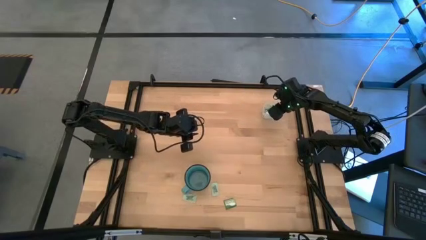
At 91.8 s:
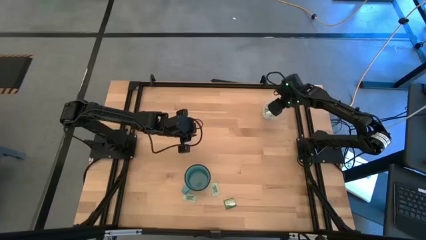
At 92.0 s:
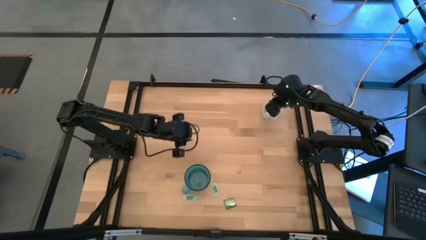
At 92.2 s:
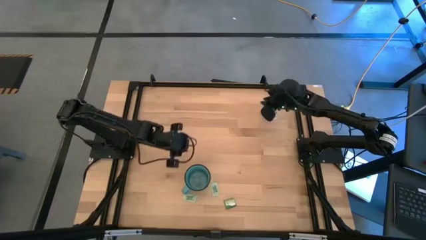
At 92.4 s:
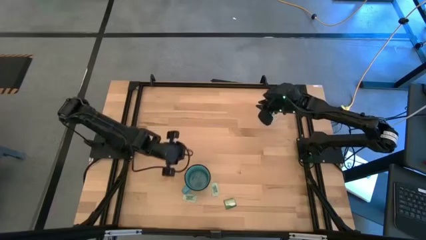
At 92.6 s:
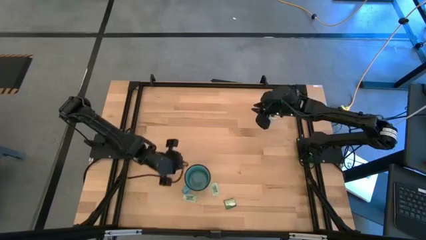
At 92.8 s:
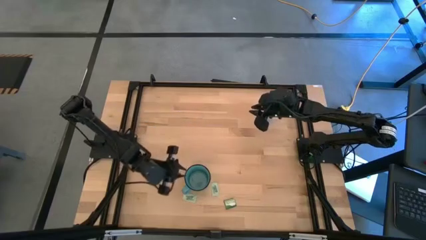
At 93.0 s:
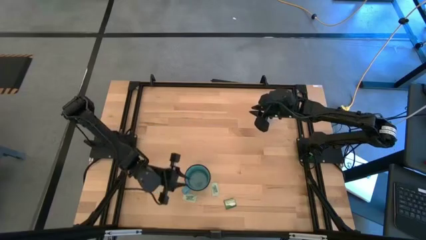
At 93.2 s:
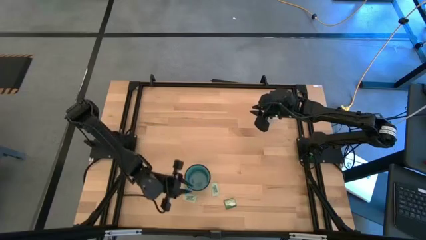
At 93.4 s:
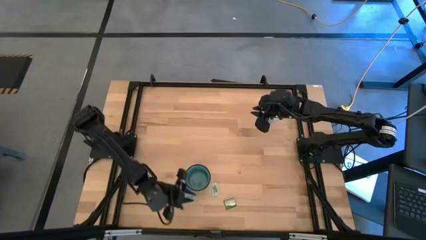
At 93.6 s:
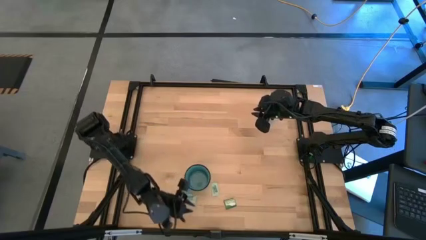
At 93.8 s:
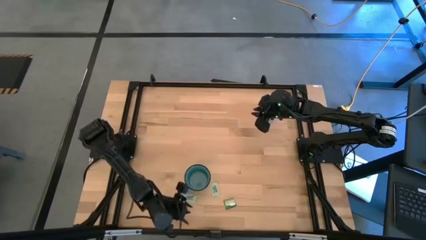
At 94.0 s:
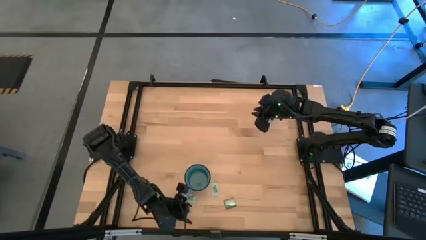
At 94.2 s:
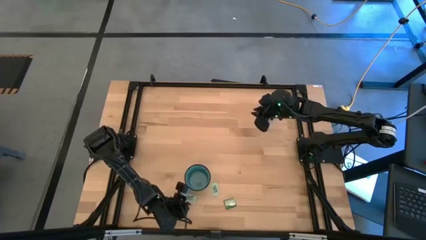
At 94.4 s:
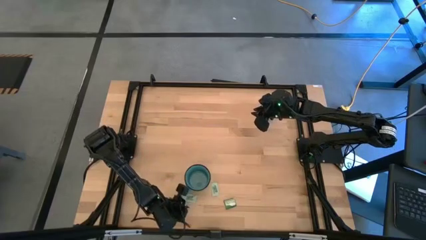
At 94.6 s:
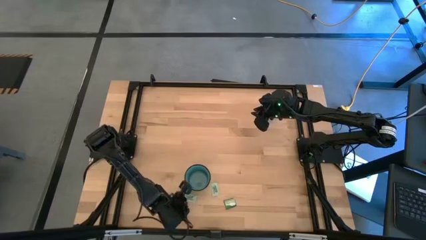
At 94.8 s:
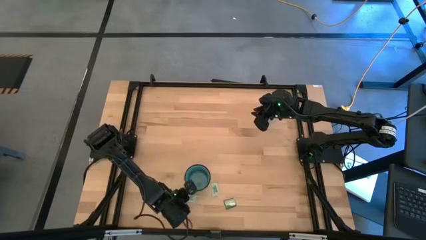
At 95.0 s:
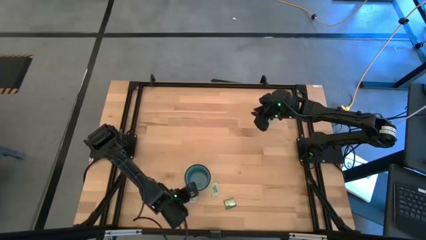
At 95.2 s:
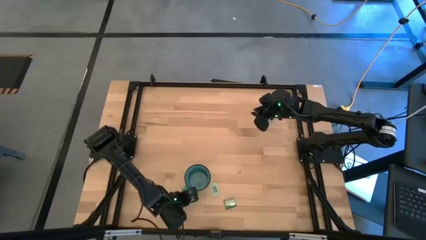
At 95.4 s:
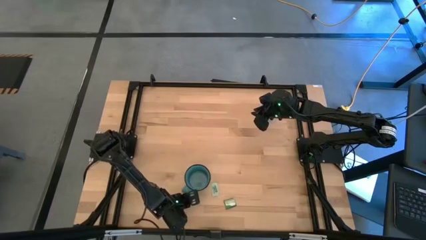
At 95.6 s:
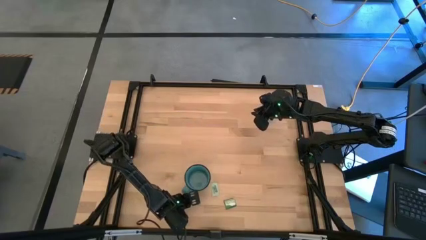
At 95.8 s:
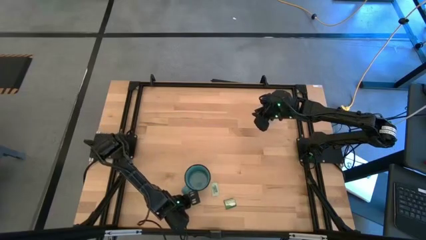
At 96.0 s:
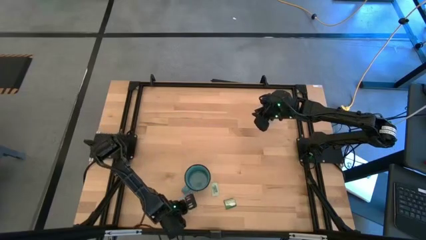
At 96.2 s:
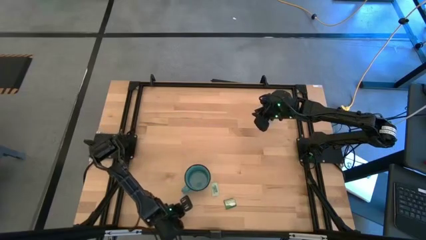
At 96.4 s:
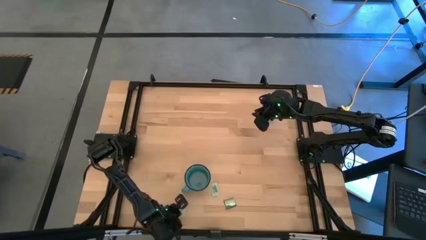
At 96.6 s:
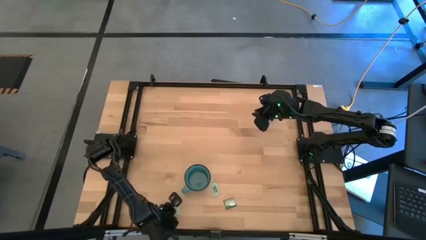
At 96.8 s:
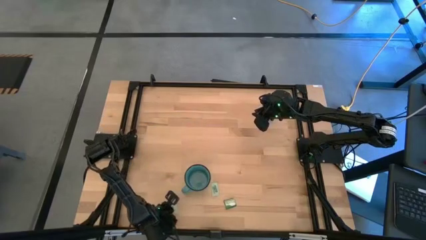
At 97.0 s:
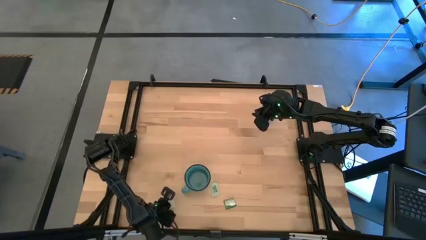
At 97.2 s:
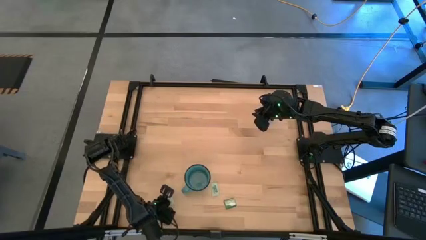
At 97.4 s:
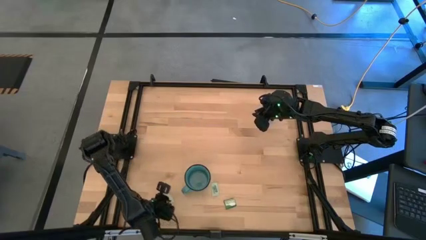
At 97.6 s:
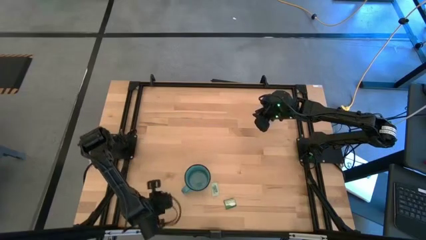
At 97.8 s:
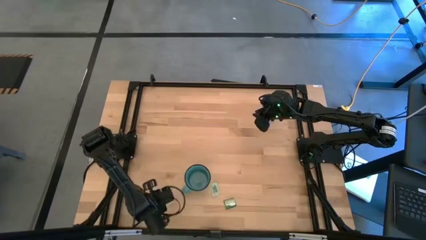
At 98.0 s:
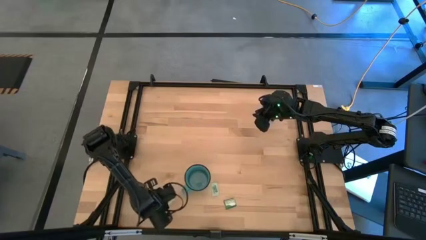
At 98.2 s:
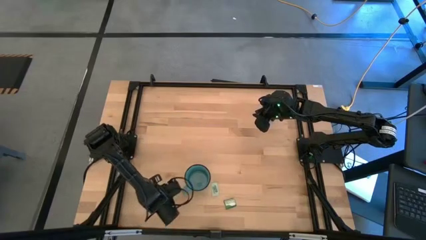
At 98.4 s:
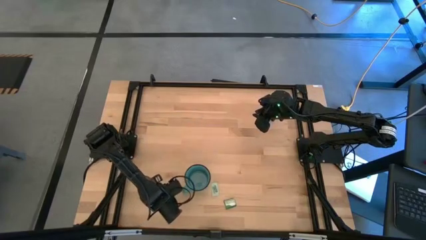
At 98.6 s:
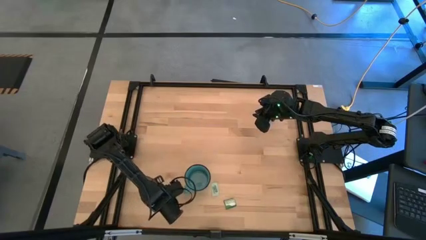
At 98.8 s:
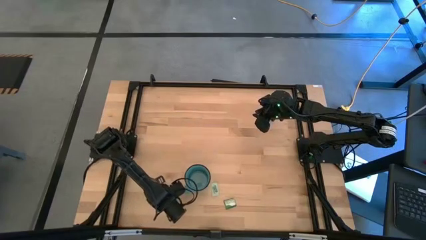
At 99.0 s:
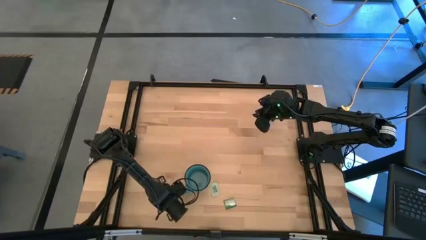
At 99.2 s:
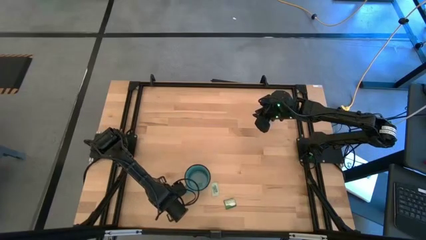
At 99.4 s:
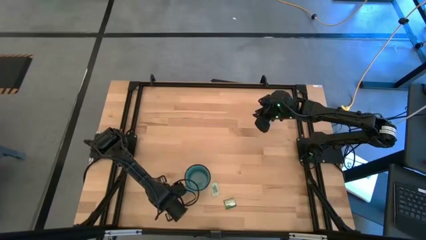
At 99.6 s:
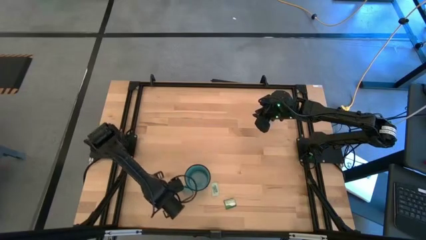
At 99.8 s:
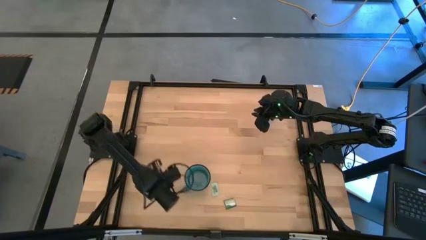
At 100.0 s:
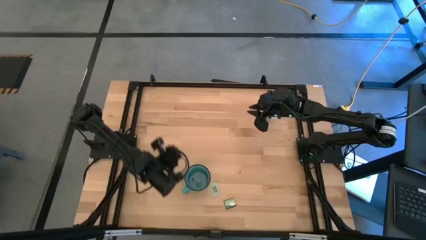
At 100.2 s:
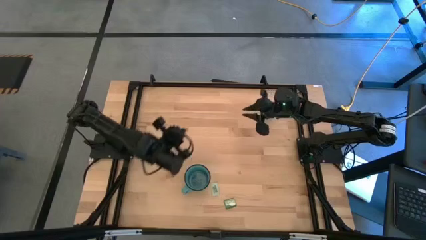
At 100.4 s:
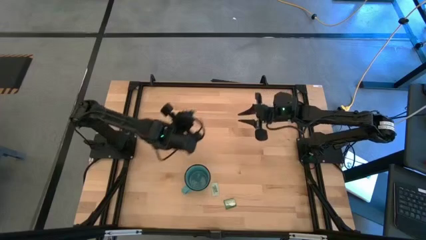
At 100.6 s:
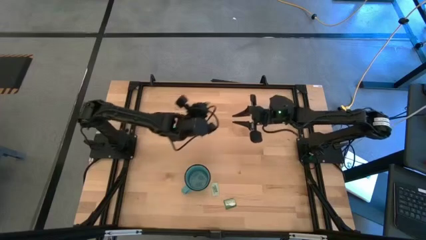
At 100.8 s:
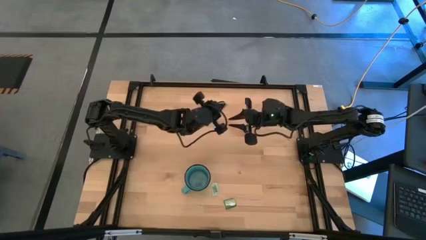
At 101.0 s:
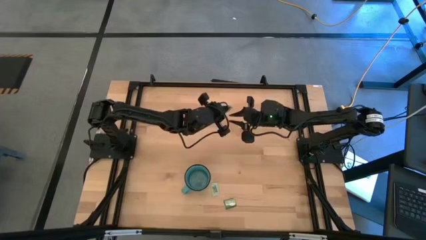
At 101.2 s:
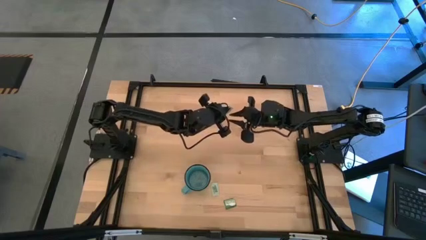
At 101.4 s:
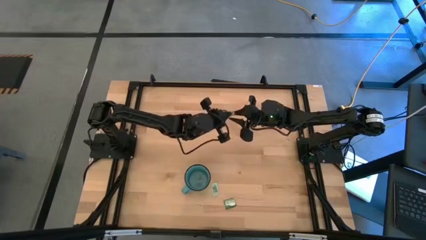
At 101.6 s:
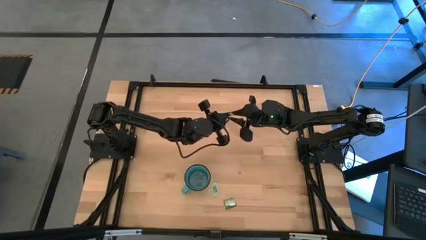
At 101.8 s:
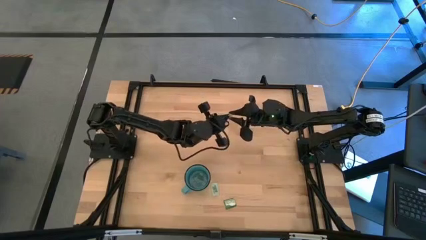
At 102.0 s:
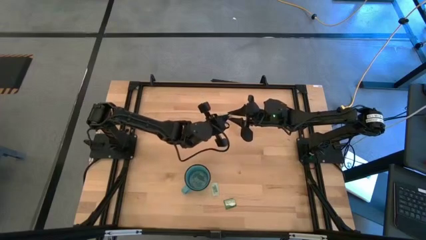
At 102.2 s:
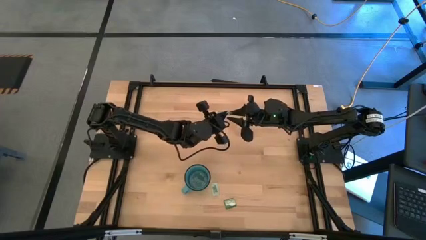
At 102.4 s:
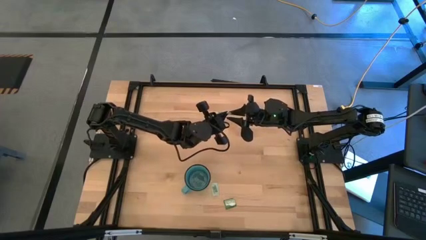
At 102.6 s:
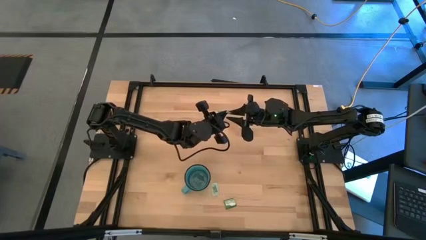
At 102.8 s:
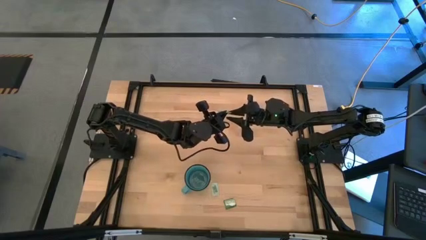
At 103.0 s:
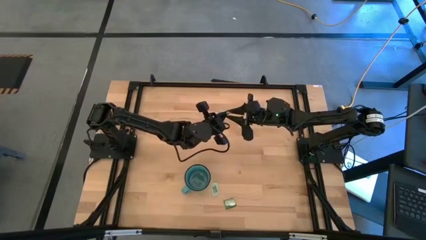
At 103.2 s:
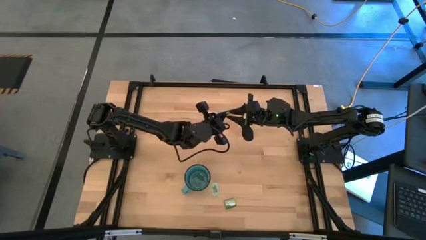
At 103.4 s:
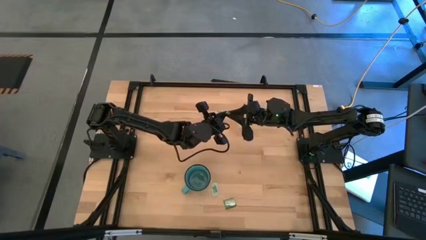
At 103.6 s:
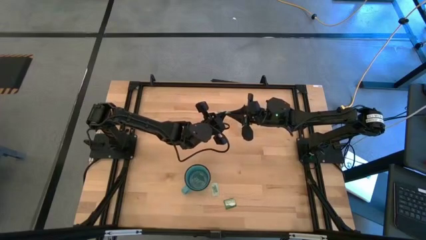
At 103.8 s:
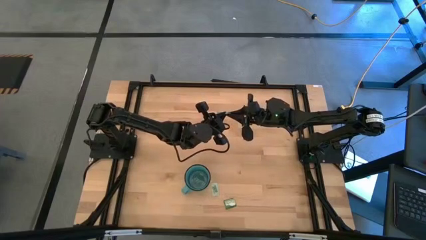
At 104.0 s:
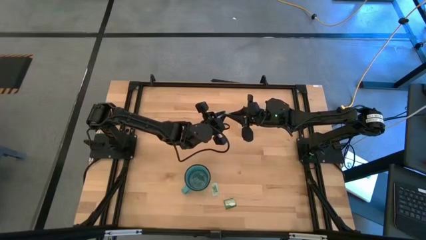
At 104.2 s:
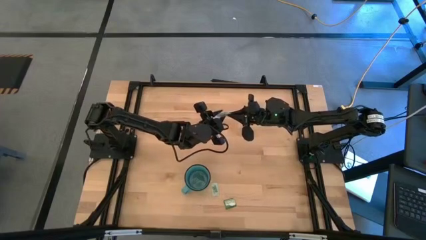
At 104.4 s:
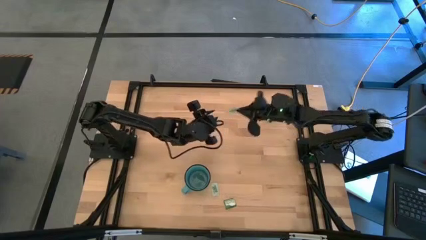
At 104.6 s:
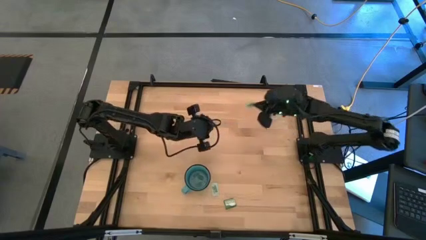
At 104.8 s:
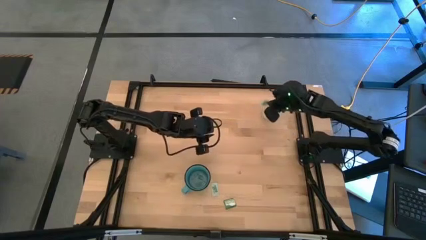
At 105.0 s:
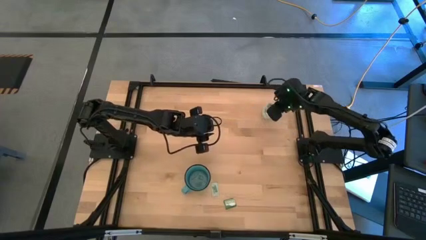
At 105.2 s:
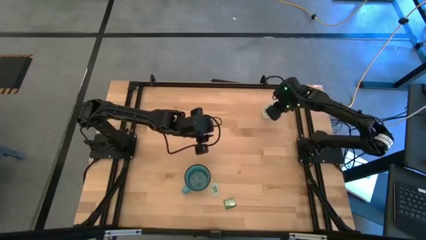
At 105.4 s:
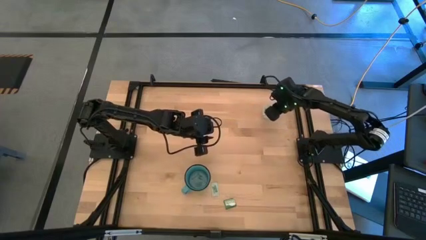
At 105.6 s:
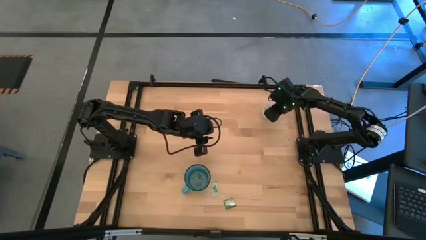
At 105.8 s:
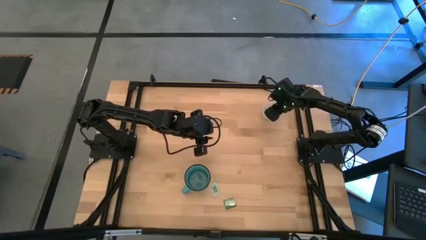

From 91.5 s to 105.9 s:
Task: Pick and place items into bin
Put the stevia packet into the transparent bin

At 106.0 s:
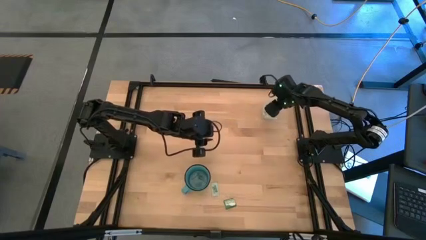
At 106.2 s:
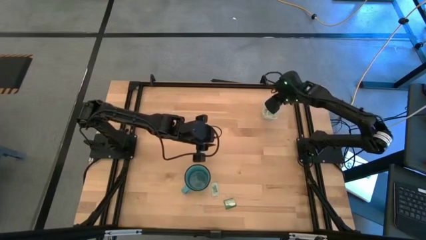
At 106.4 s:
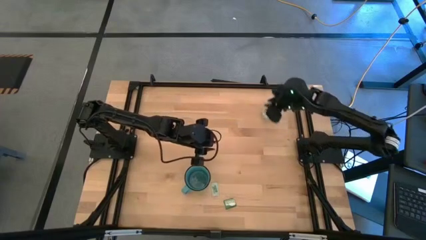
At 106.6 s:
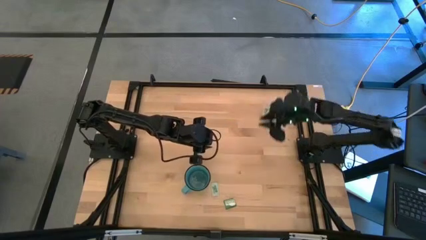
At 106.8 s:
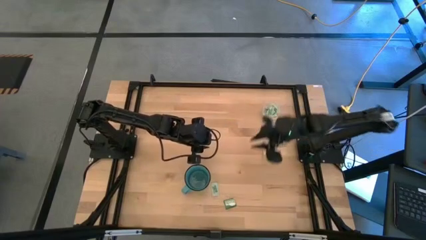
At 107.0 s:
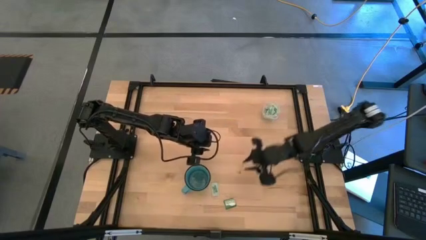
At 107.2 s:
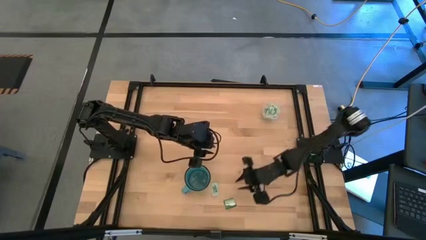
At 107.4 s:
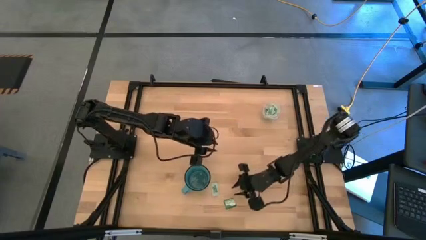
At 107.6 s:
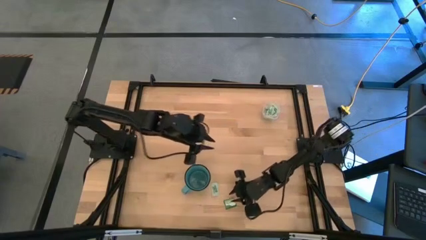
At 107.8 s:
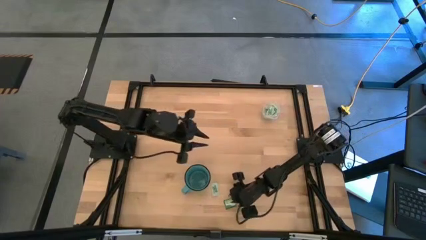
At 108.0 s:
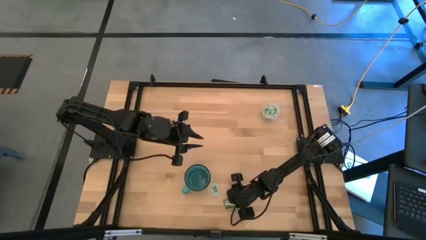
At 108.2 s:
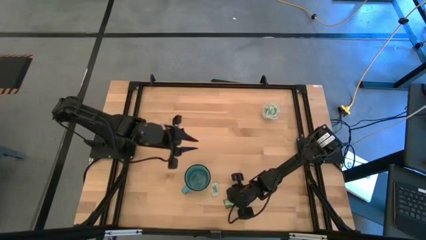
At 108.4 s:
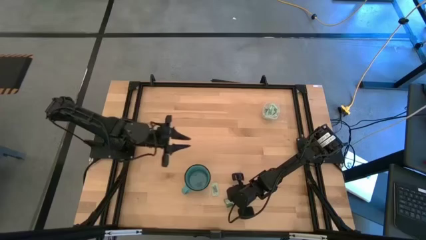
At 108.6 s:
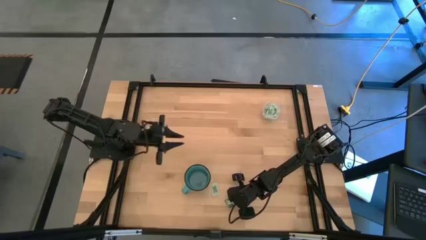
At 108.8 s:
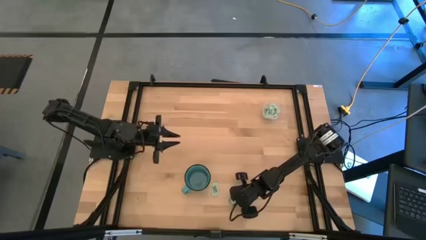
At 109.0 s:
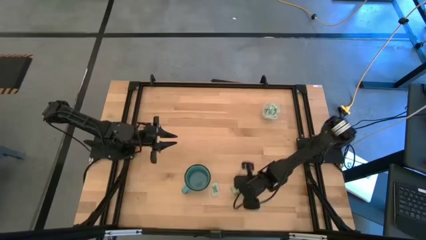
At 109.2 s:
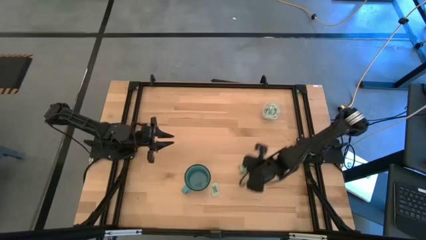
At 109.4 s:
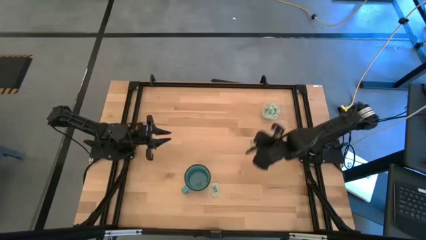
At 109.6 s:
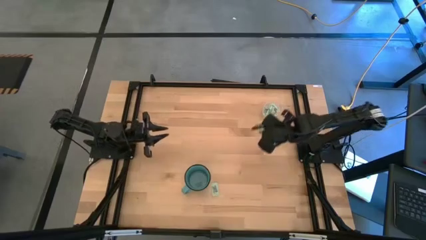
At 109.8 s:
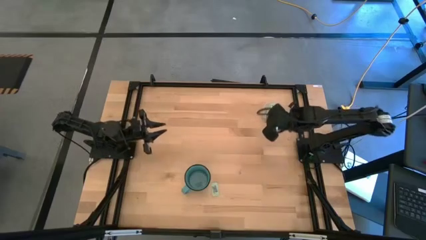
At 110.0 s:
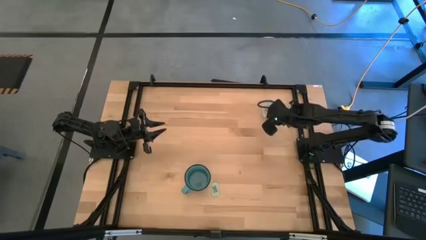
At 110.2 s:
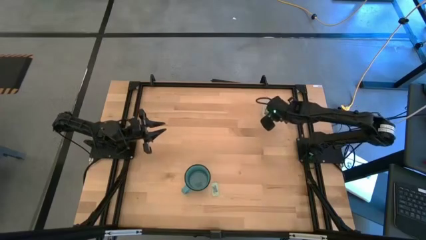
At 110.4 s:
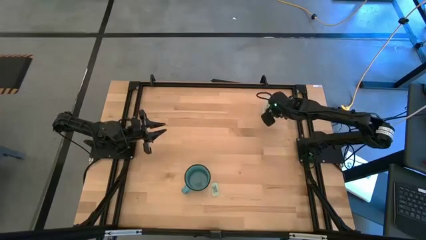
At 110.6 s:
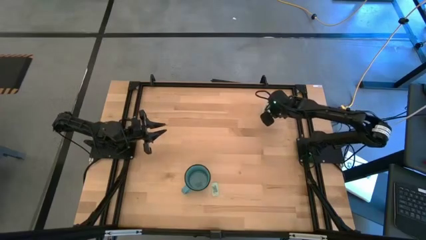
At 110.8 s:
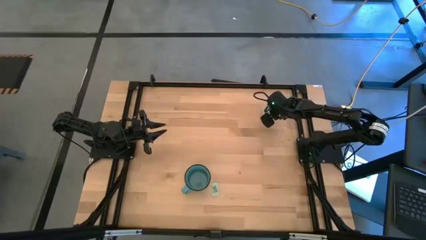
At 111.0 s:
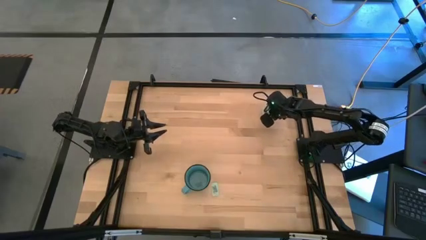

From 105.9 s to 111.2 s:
Put the truvia packet into the transparent bin
